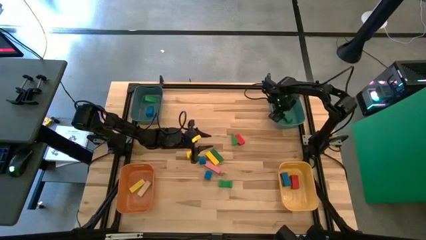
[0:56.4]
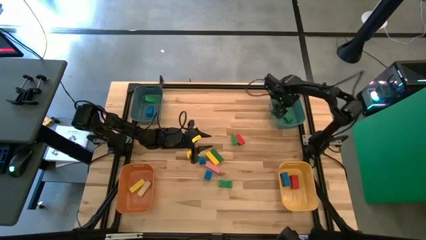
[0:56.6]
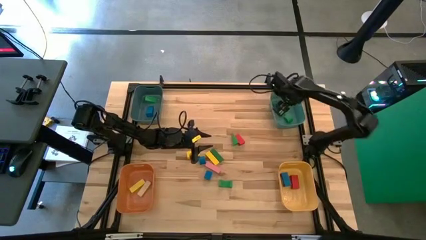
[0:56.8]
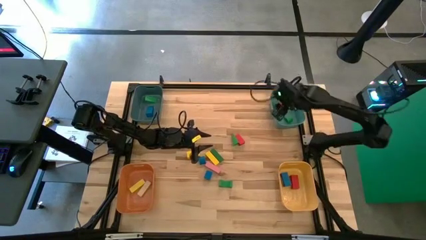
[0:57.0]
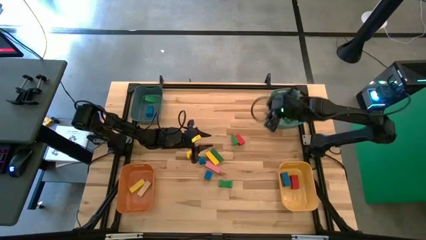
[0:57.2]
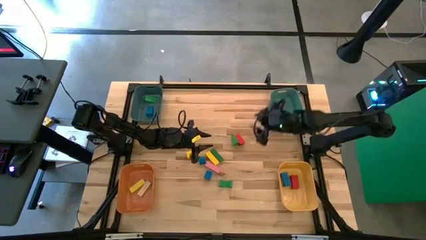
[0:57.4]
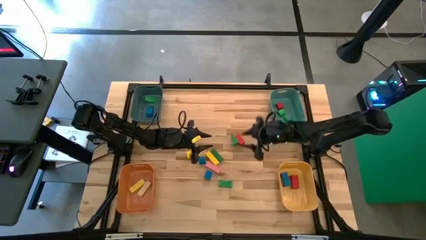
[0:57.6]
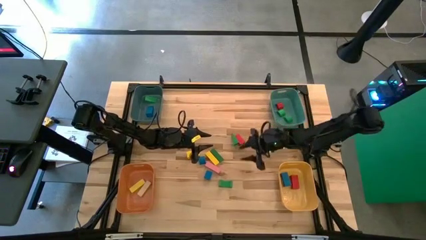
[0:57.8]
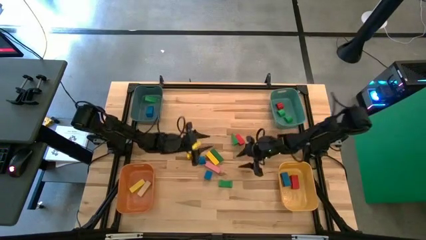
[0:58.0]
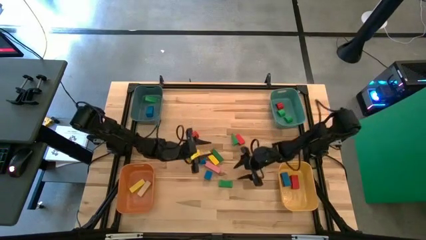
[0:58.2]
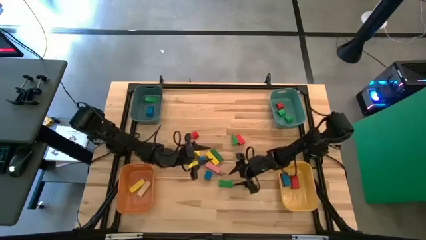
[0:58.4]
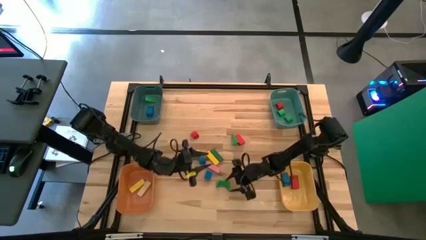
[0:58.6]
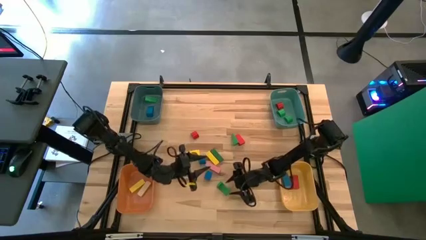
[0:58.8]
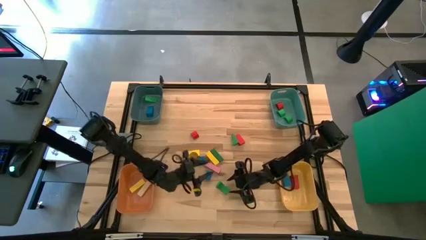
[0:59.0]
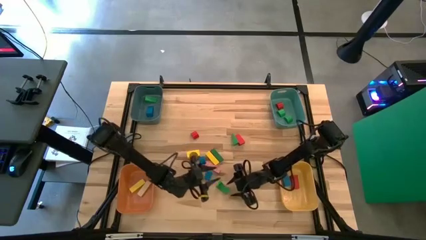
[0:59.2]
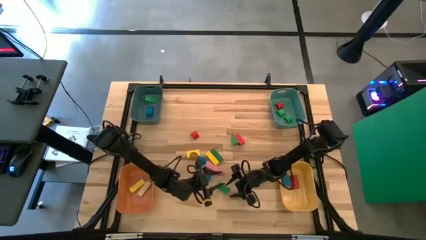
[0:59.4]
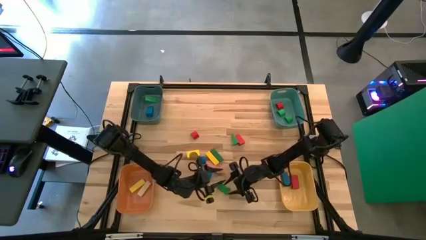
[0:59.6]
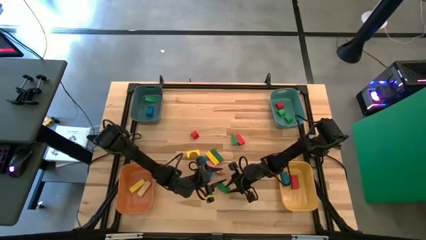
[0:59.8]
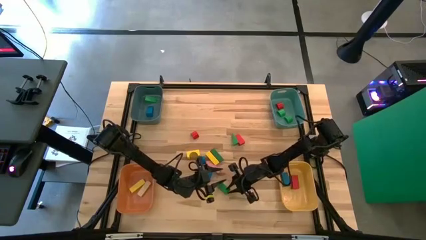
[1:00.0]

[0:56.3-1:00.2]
Task: Sort blocks by size
Put the green arch block into the yellow bin

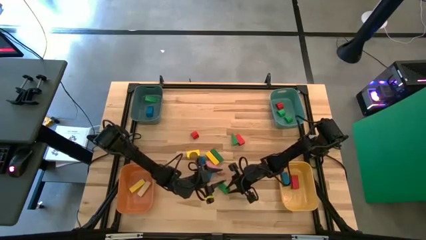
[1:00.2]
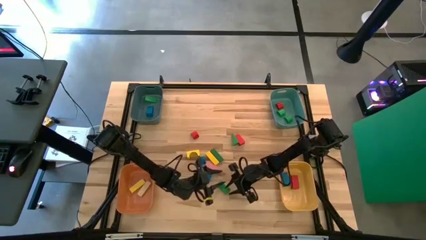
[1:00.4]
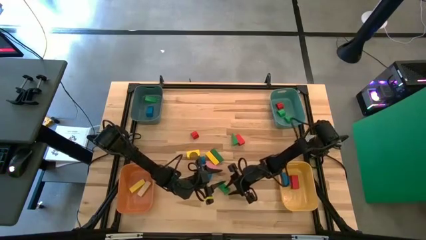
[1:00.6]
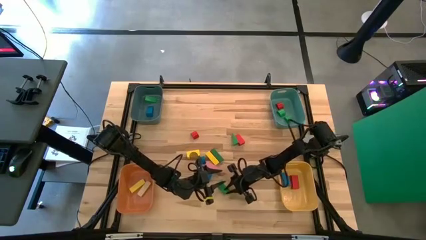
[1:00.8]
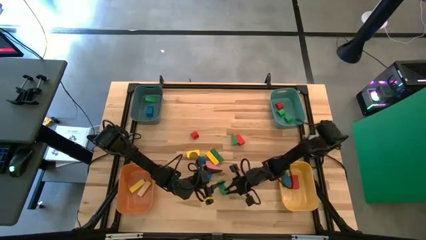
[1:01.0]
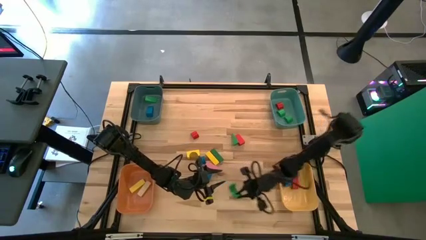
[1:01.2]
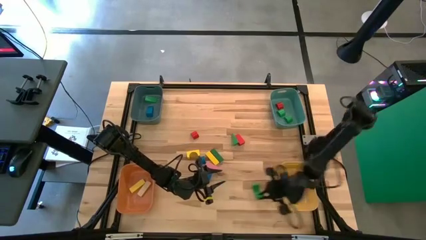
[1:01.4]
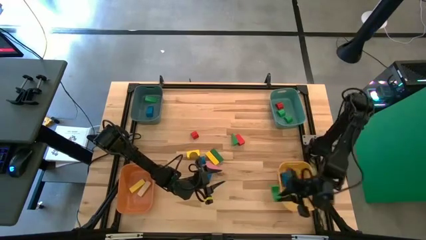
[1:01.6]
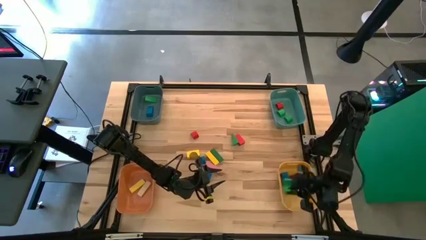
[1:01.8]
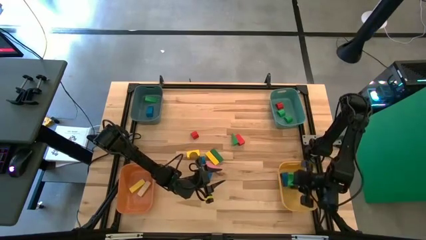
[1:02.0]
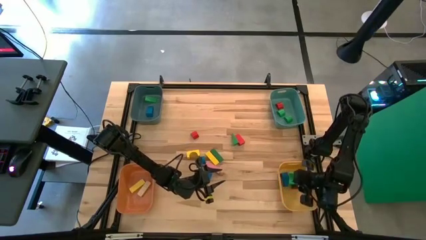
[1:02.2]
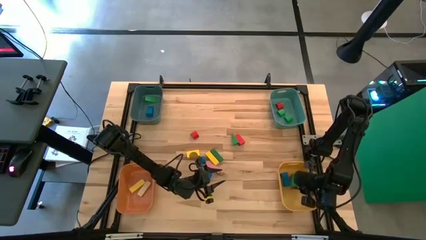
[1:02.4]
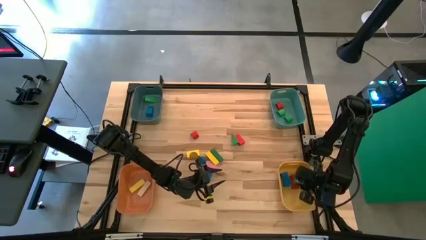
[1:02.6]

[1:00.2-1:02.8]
Put the green arch block into the yellow bin

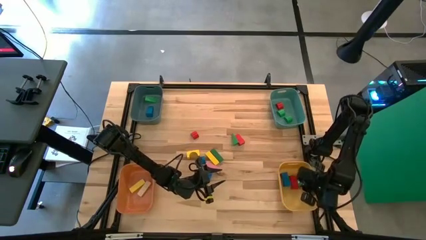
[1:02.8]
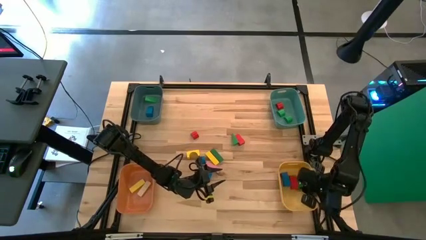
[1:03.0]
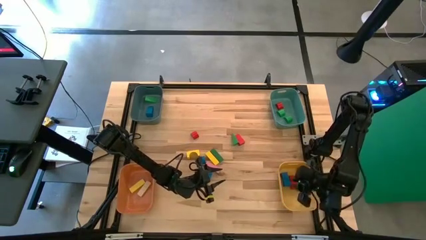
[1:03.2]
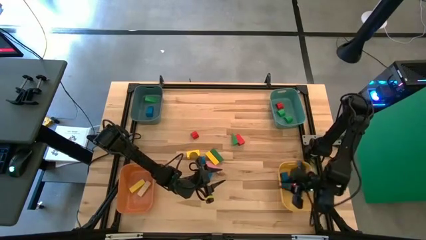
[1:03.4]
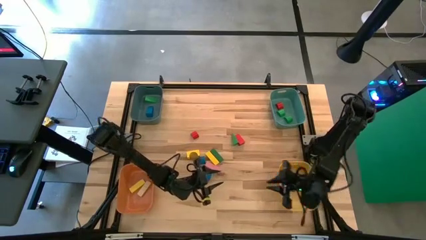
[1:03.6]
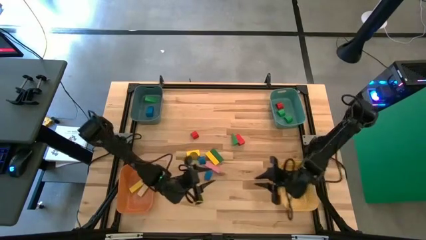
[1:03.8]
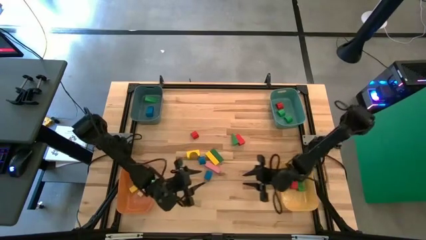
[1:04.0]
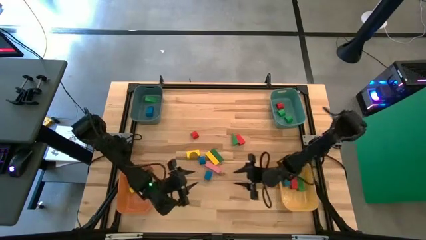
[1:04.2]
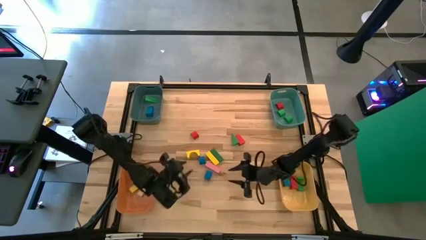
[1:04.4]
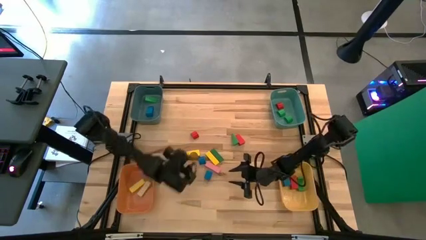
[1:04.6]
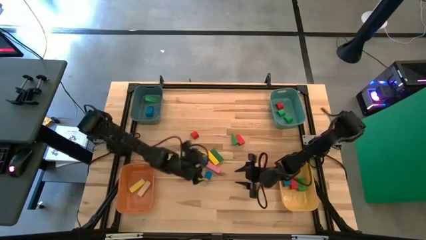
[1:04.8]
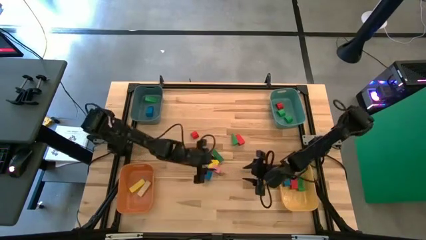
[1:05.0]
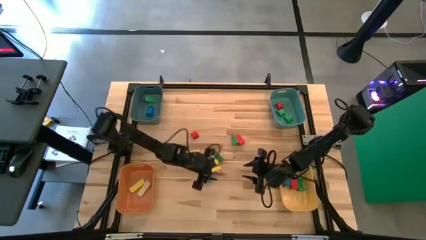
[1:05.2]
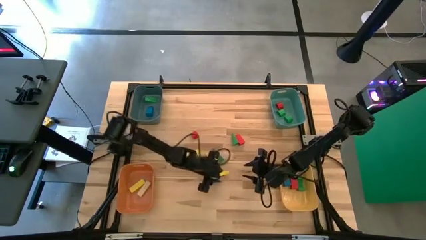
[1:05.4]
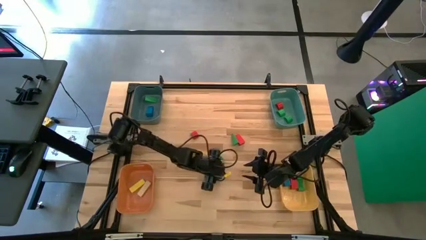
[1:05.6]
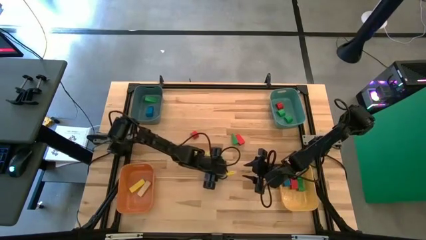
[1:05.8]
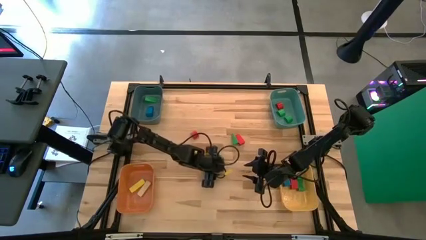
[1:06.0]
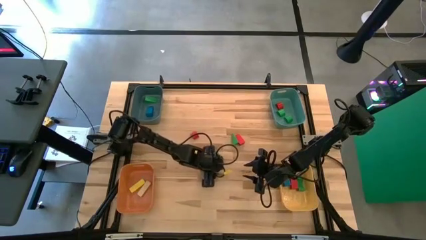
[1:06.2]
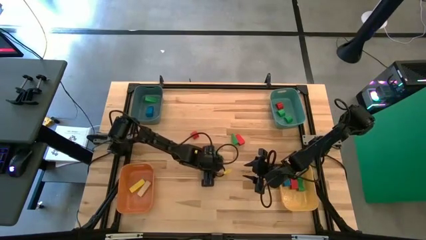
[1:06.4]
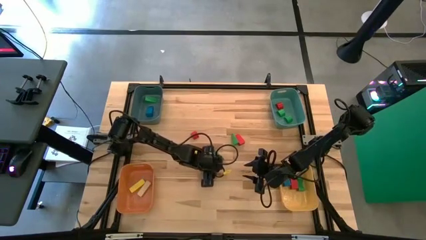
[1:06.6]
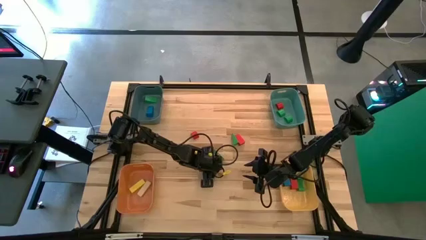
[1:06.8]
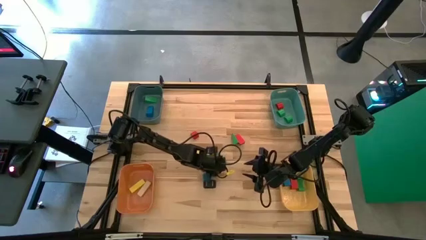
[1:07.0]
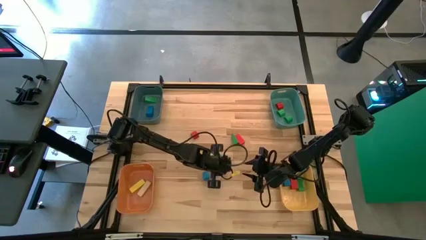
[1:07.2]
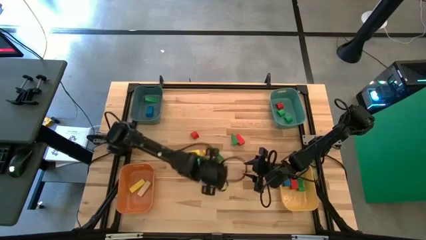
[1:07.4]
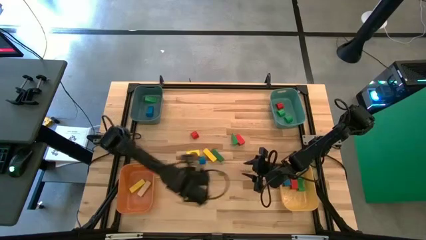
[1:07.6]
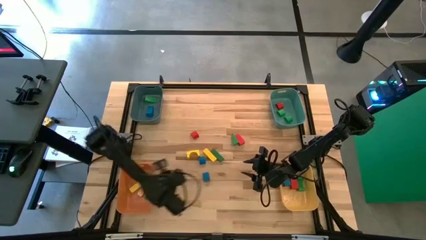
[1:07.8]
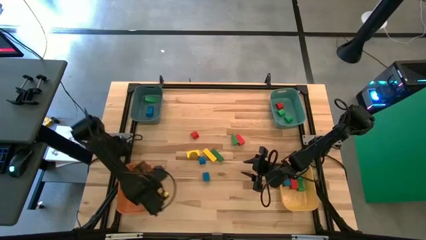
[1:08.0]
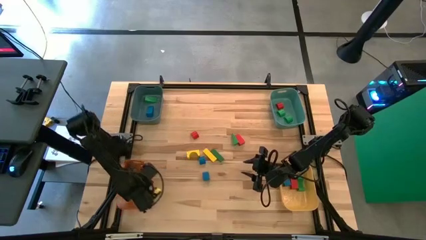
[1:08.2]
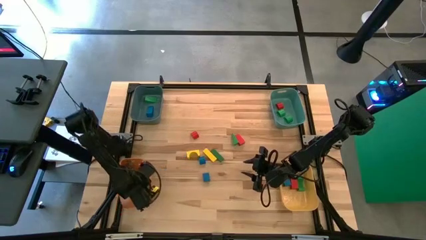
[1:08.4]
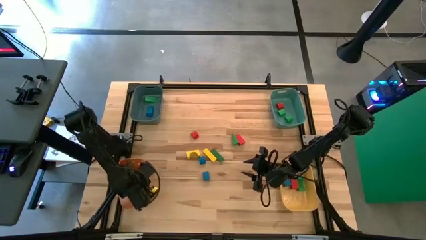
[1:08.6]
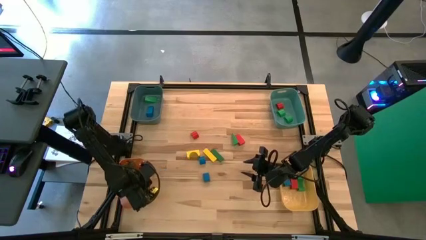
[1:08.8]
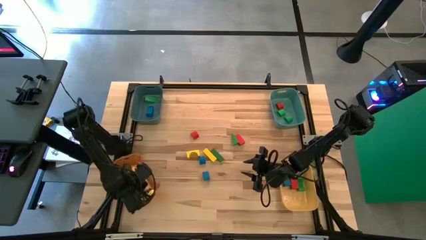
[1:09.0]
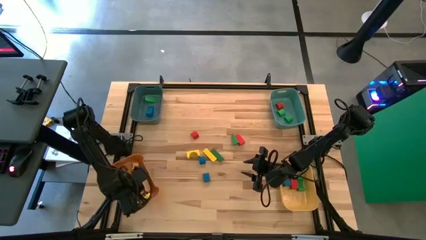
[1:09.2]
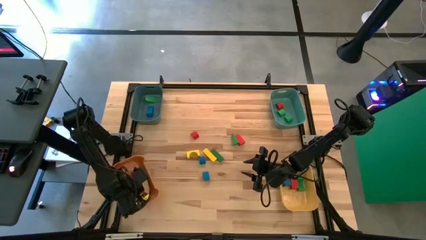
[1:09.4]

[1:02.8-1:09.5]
Put the pink rectangular block into the orange bin

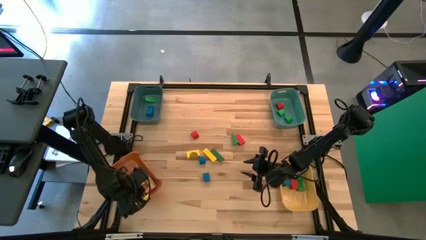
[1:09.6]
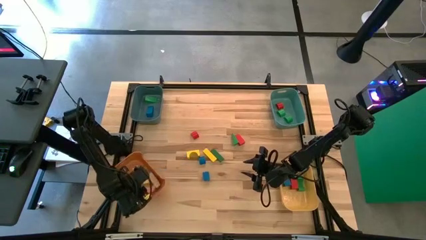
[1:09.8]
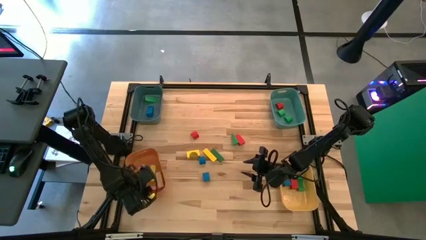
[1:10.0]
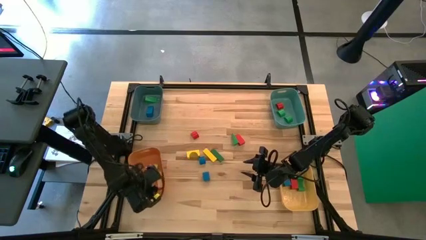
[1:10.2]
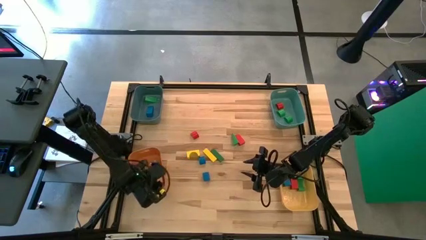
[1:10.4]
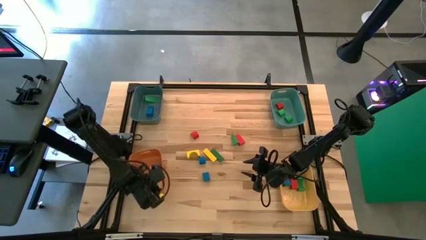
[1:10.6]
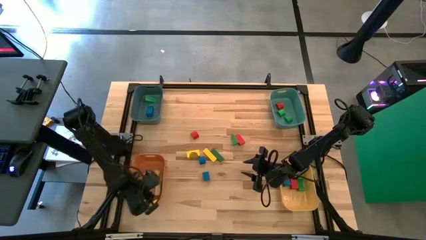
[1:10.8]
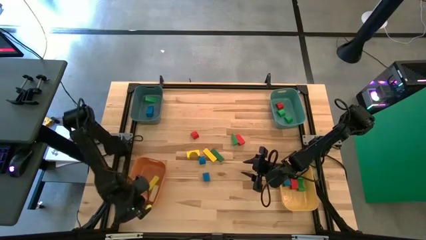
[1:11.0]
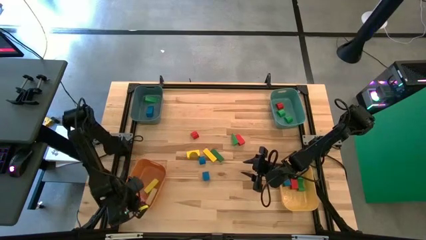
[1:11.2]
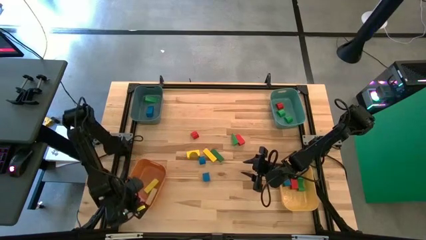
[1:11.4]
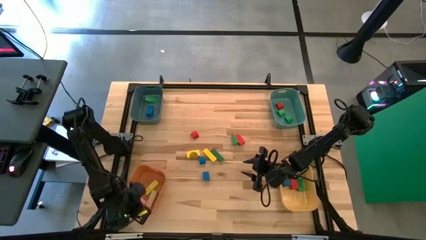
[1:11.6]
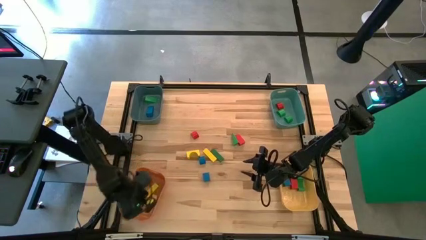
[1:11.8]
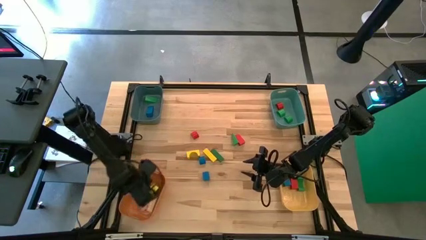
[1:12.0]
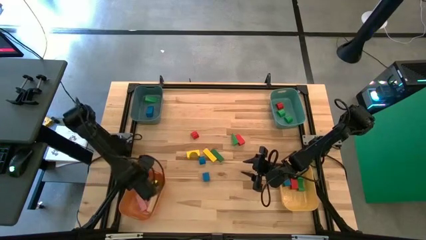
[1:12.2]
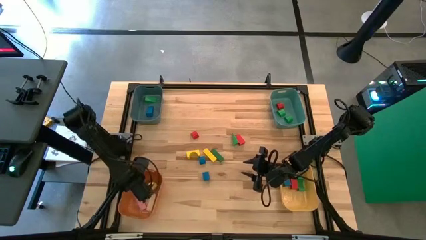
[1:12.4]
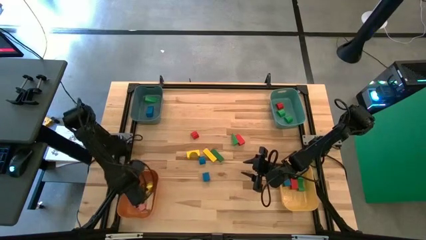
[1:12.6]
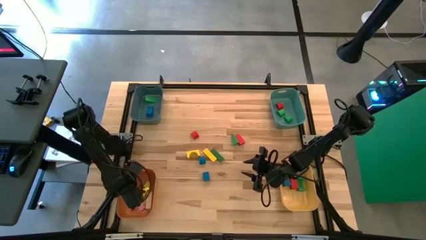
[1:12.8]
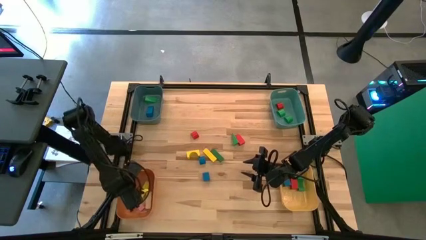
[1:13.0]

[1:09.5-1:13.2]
Adjust the orange bin

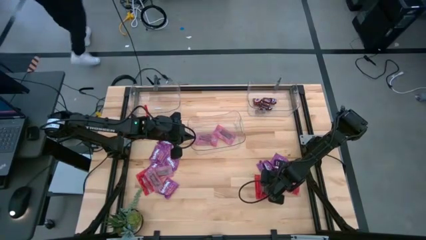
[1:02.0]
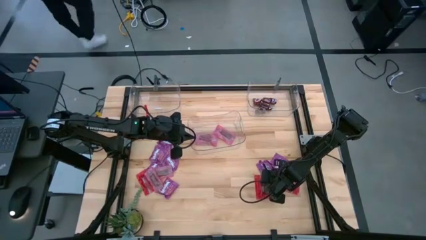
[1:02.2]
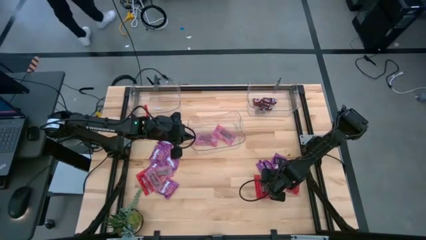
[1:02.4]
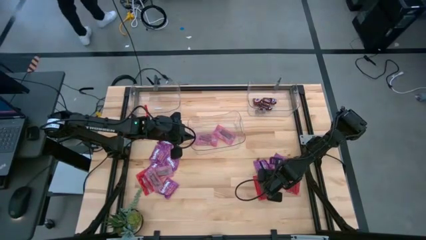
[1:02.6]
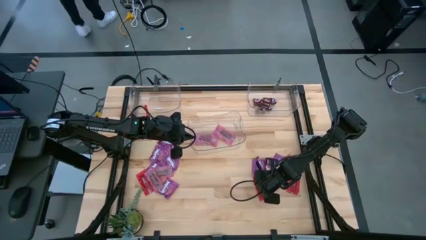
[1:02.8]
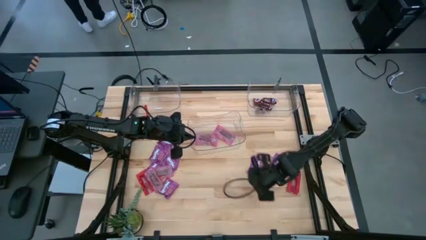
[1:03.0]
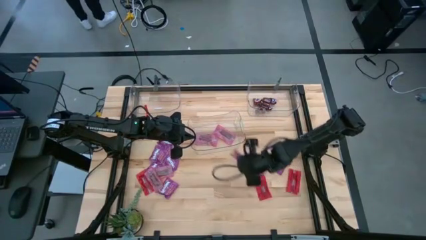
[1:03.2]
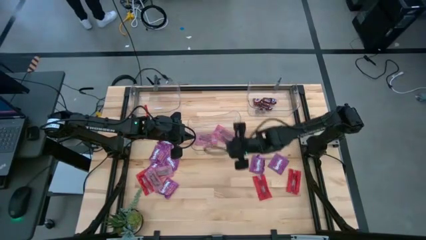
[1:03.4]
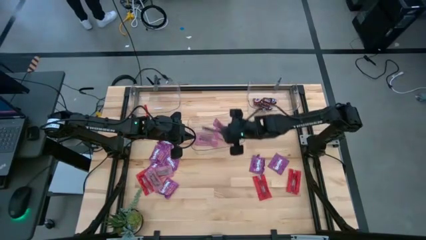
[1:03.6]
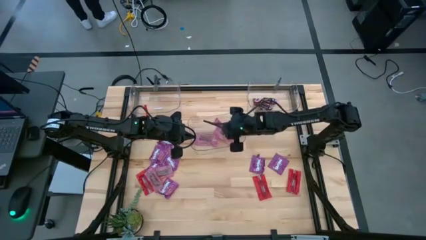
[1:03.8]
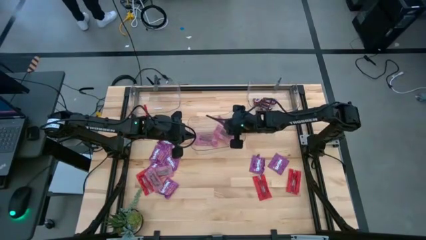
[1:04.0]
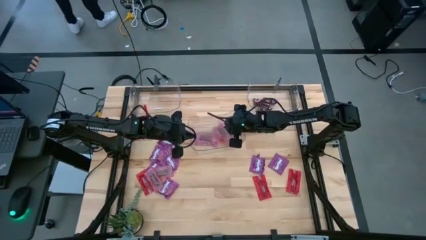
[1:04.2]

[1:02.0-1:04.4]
Task: Sort candy
Put the red candy pack into the bottom transparent bin
